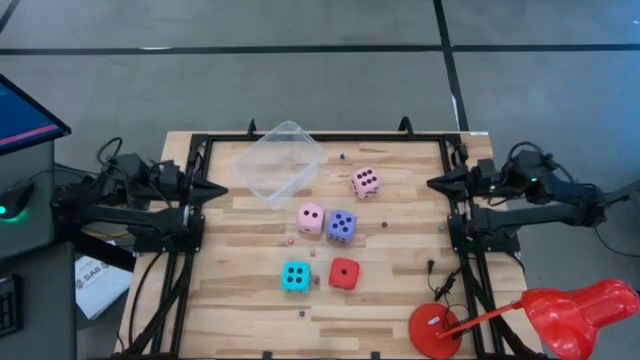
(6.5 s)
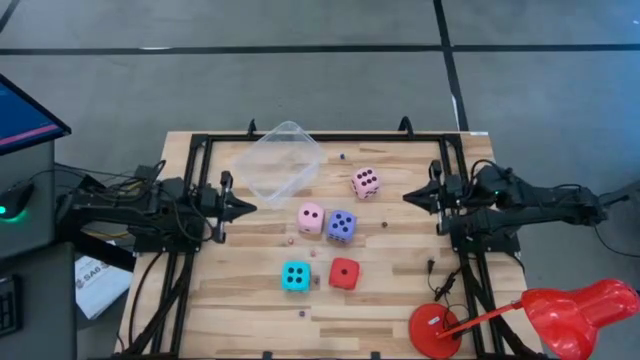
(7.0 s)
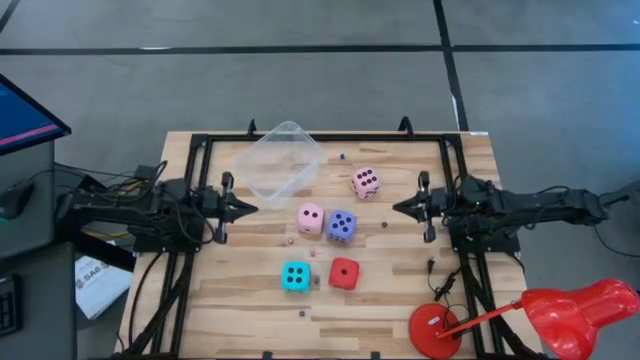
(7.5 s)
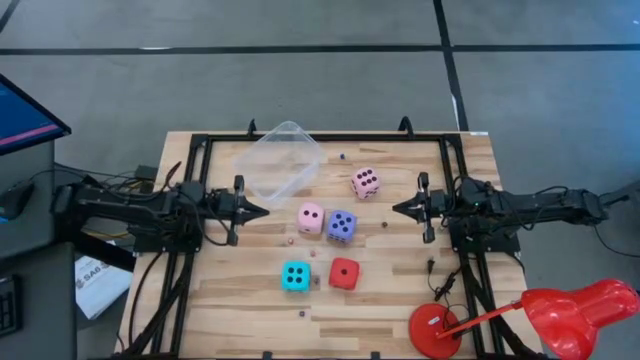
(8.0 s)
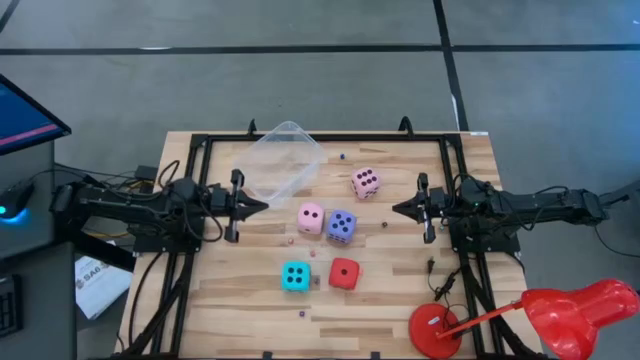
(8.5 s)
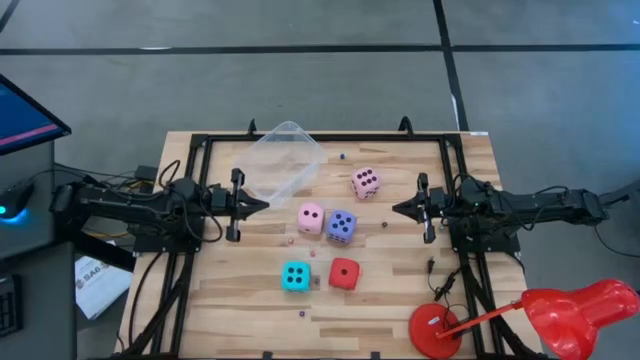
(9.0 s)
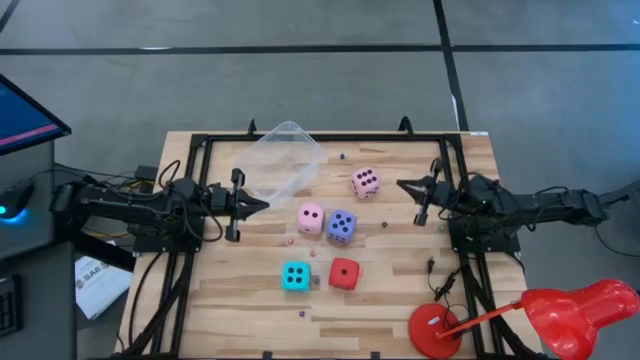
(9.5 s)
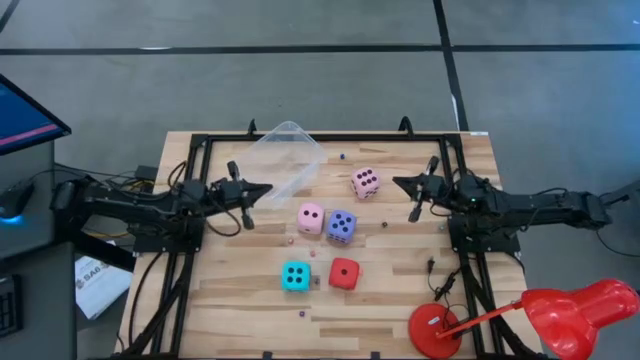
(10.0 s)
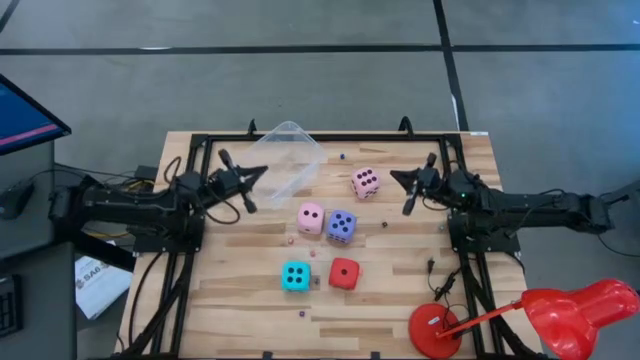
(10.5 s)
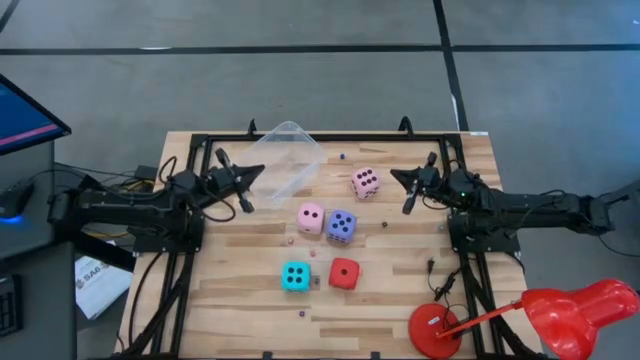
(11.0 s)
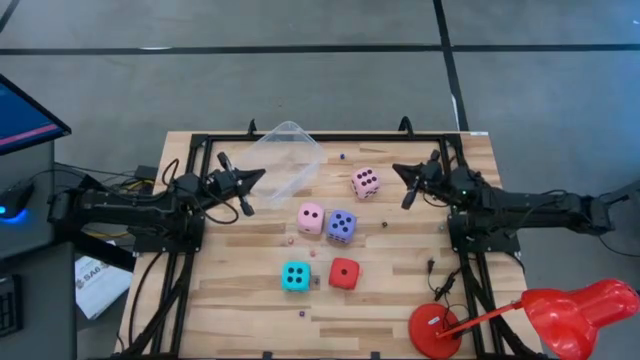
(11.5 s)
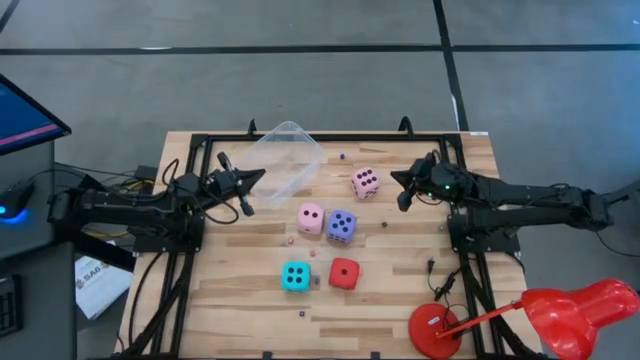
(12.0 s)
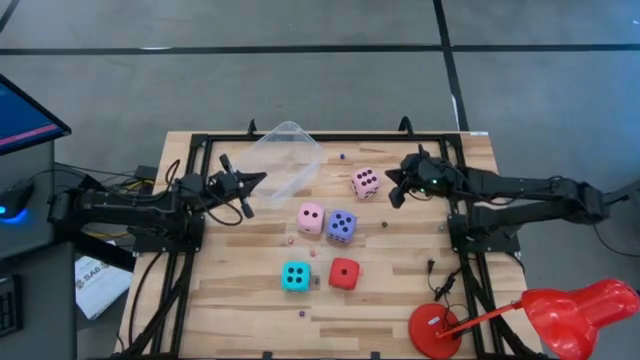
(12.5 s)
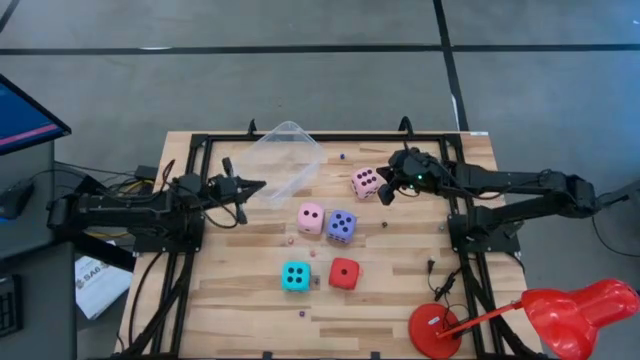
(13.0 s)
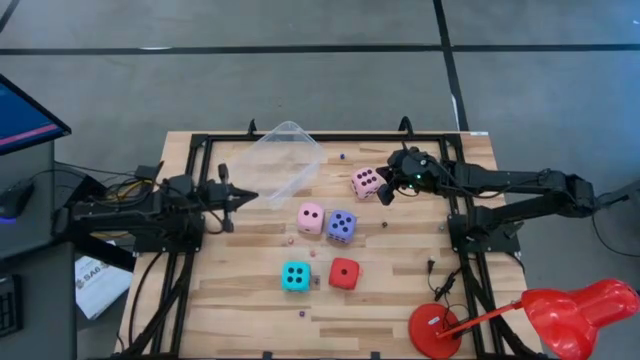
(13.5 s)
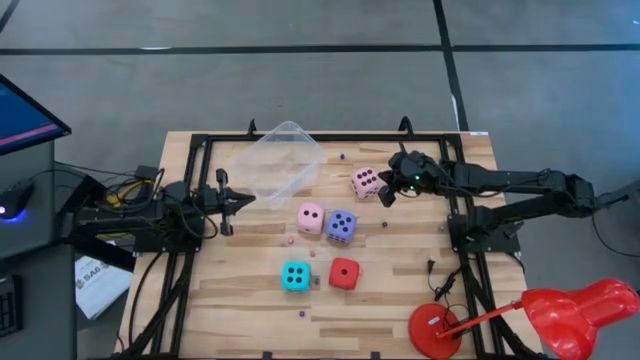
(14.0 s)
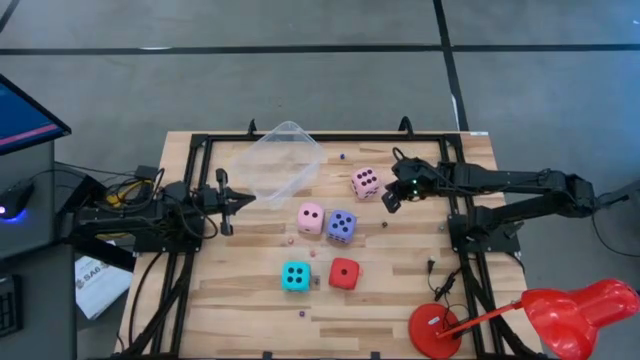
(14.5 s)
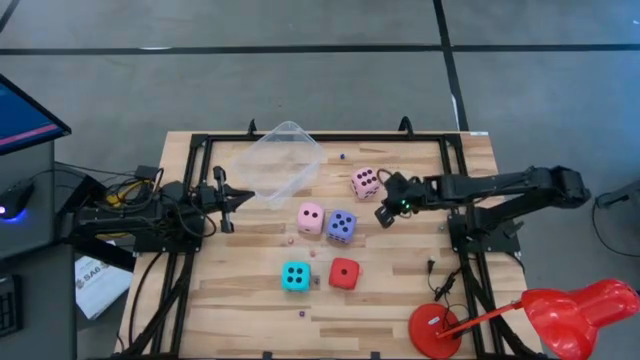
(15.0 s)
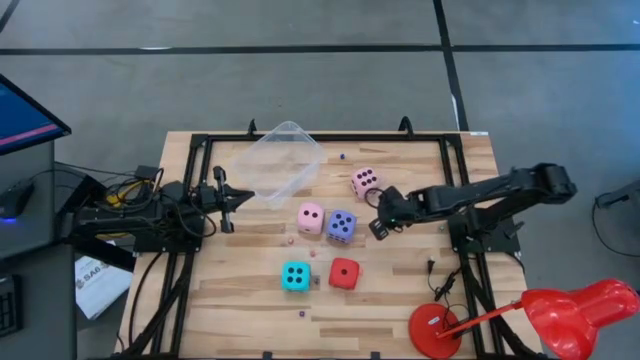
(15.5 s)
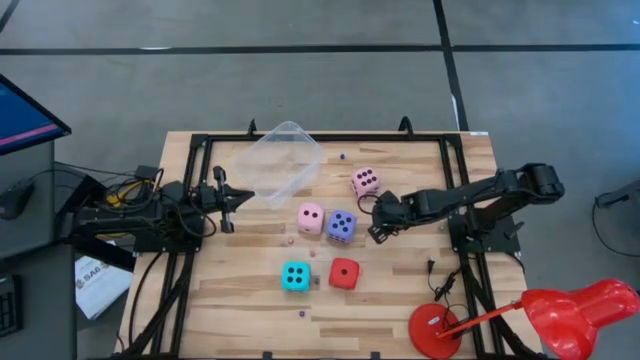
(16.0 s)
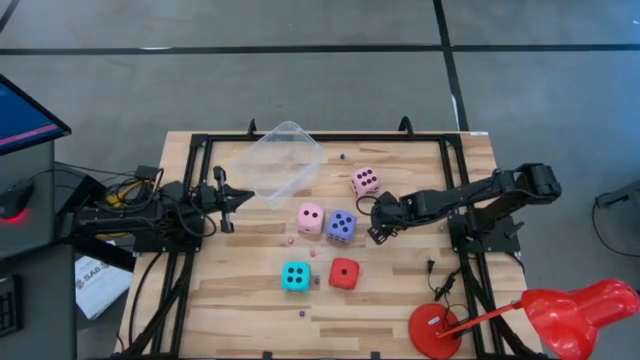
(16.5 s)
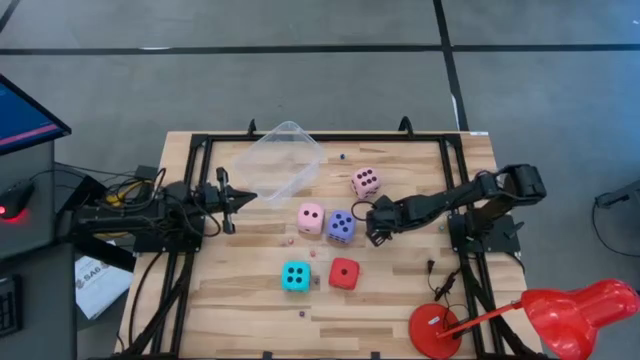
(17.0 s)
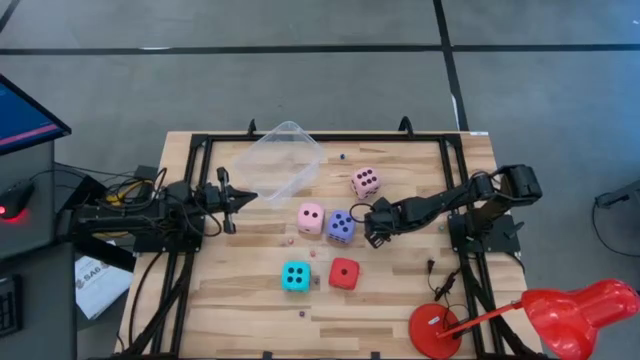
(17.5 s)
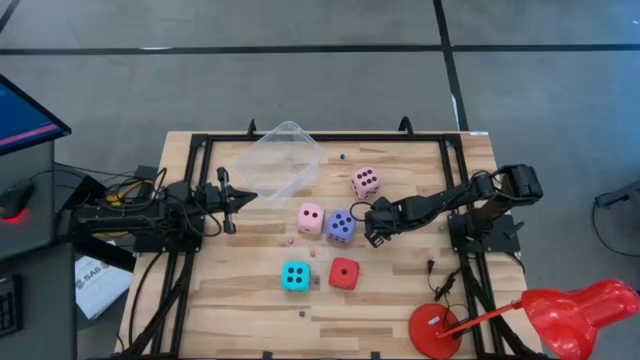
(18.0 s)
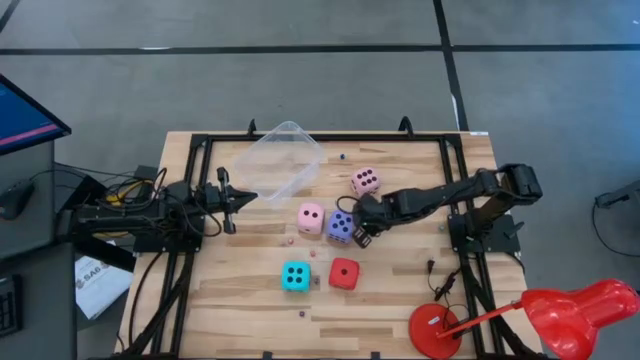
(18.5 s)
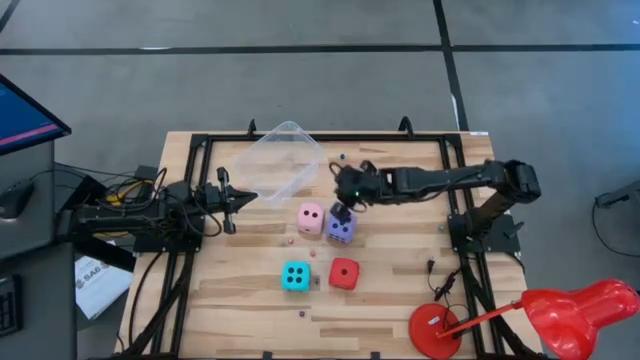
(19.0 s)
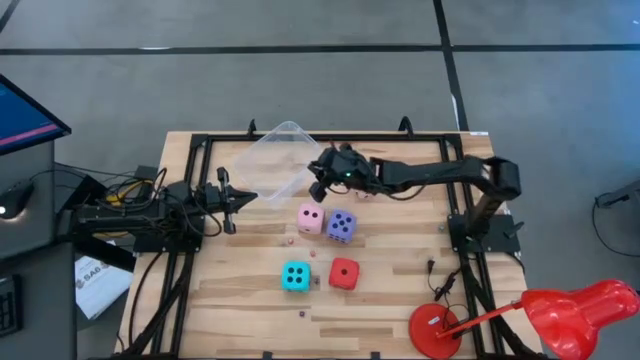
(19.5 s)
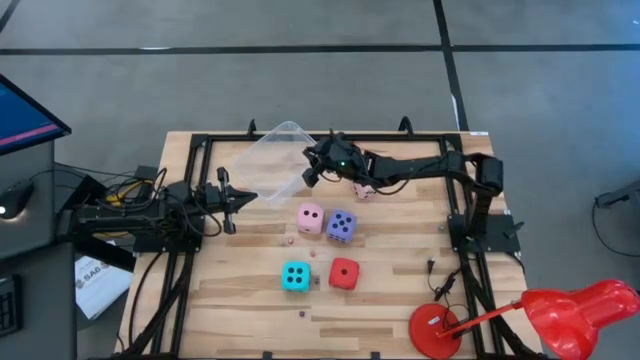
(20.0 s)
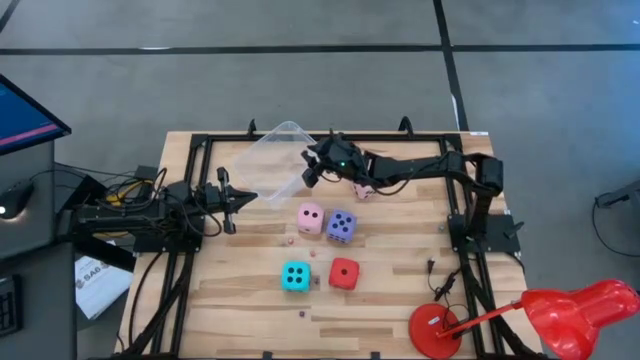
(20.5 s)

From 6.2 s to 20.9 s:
Task: Pick & Place Dice
Put the small black dice into the transparent container

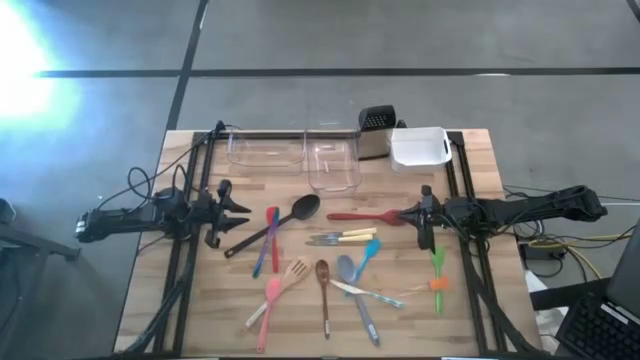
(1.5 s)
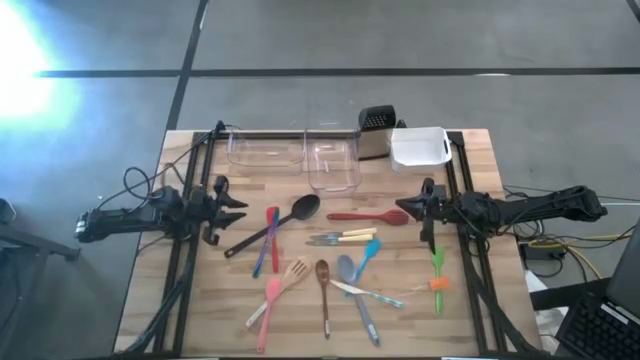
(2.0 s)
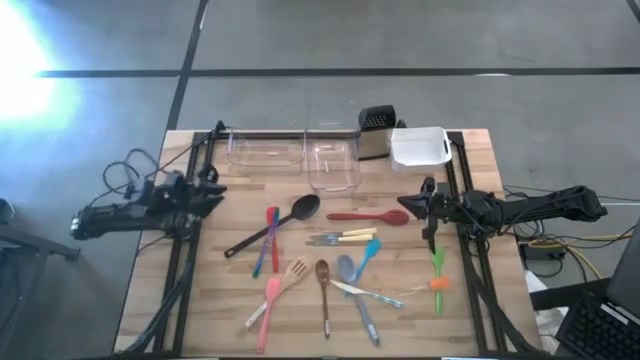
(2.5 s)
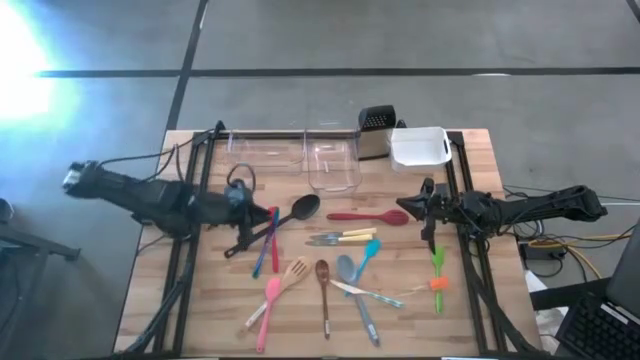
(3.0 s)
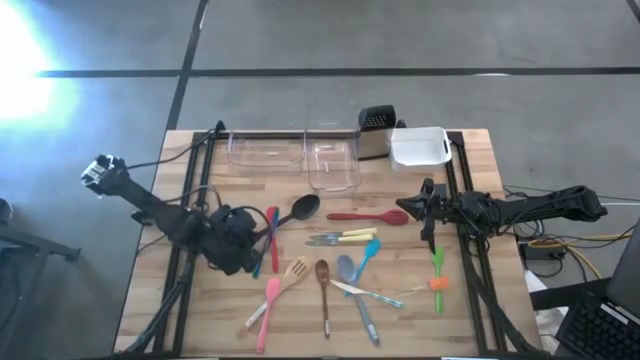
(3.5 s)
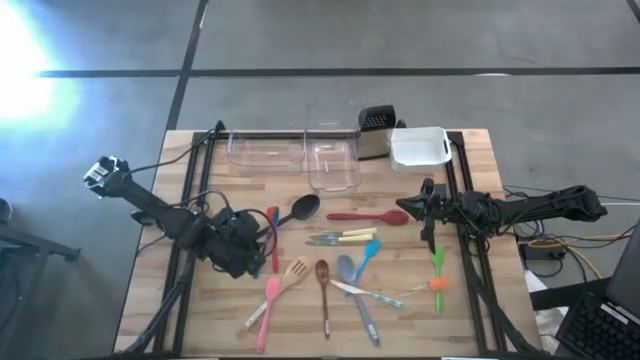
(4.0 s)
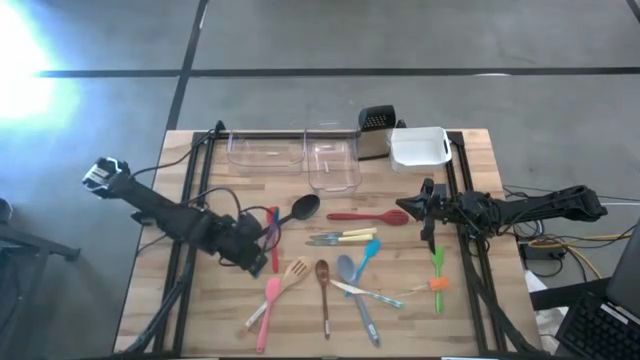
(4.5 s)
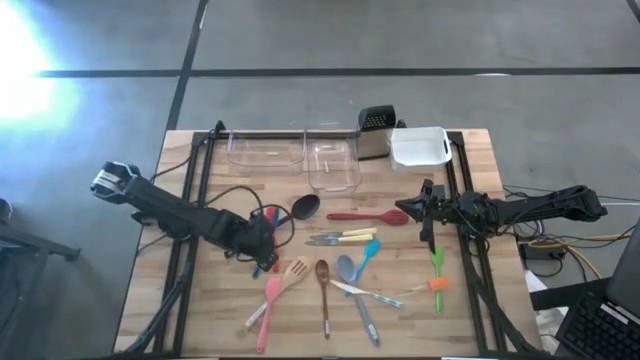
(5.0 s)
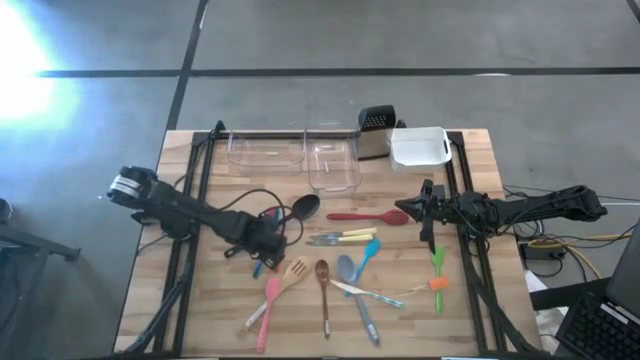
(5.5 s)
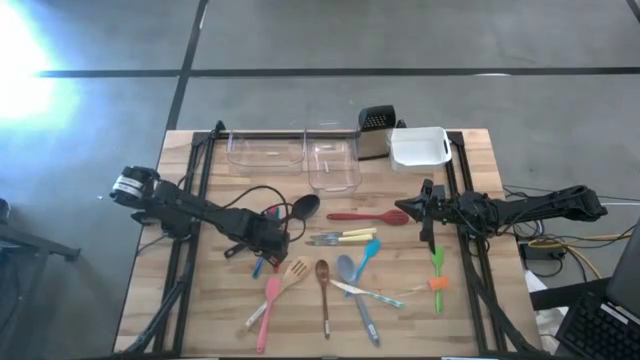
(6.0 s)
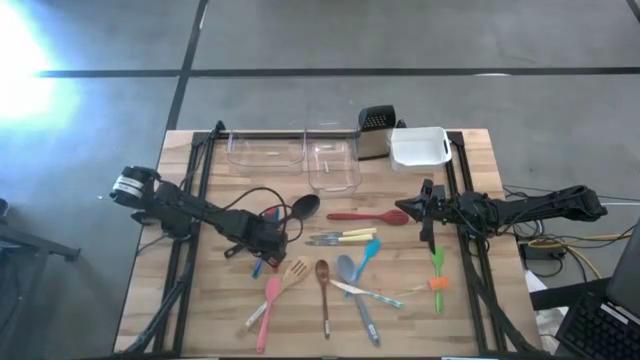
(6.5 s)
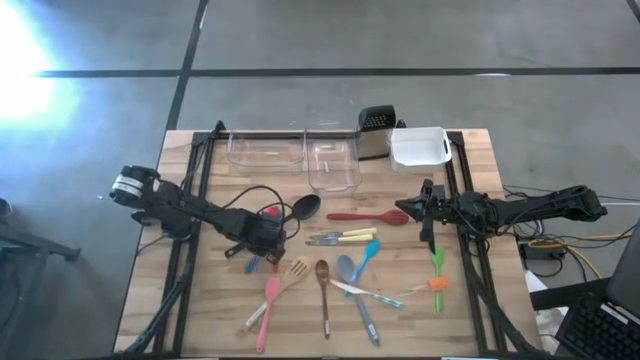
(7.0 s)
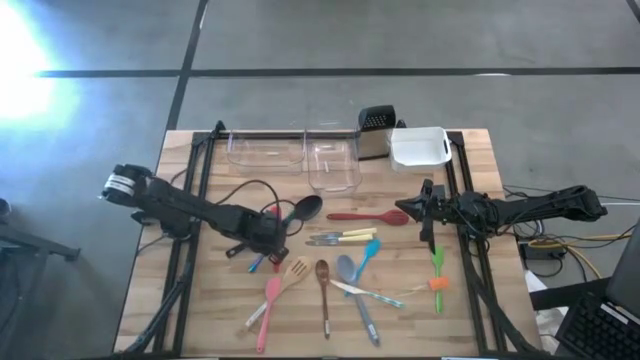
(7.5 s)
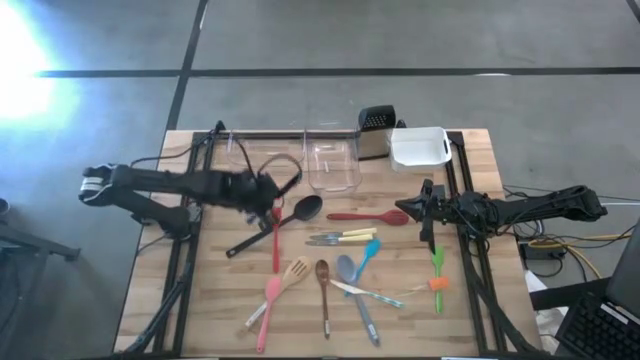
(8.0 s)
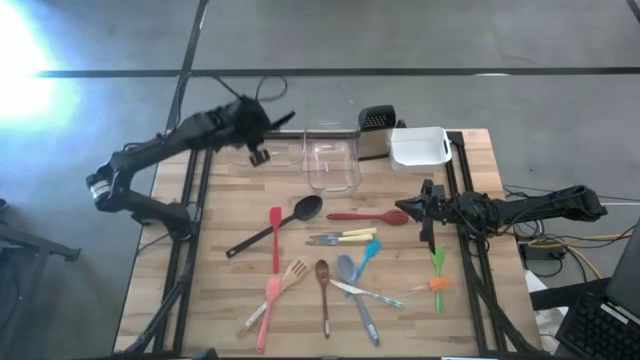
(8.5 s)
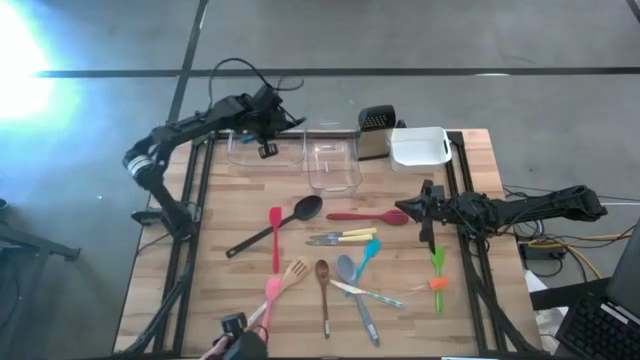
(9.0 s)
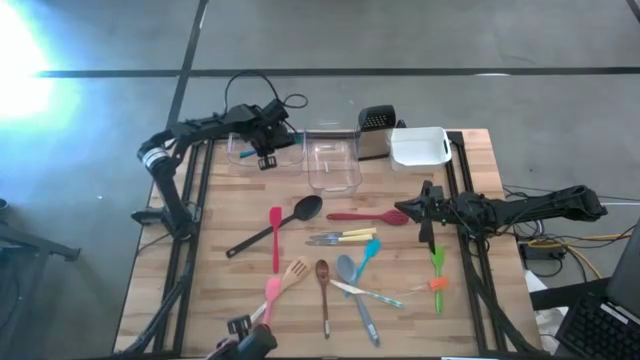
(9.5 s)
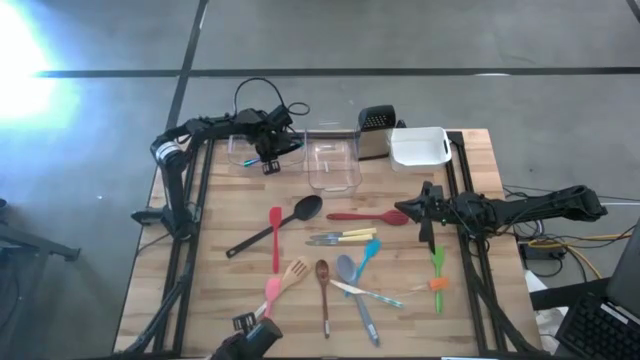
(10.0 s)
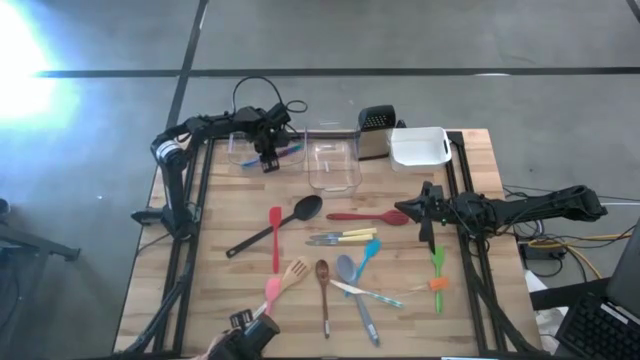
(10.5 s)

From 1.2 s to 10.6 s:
Task: Pick & Place Kitchen Items
Put the purple knife into the left transparent bin
